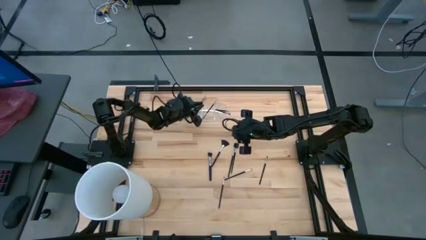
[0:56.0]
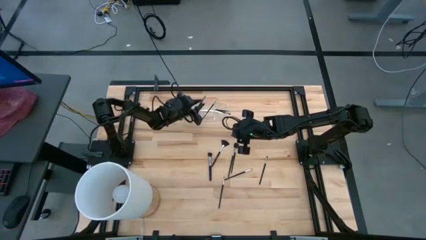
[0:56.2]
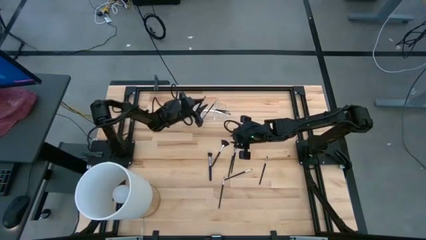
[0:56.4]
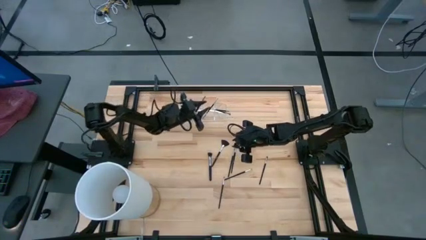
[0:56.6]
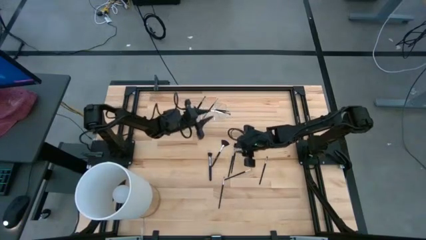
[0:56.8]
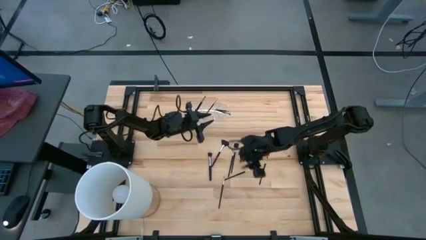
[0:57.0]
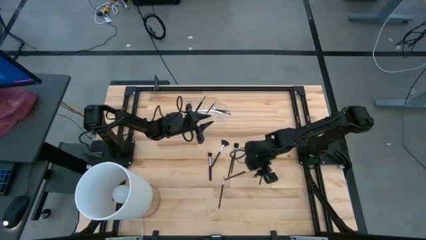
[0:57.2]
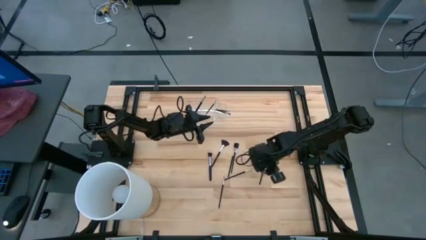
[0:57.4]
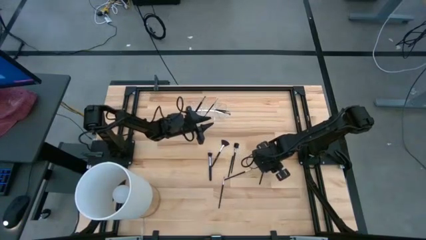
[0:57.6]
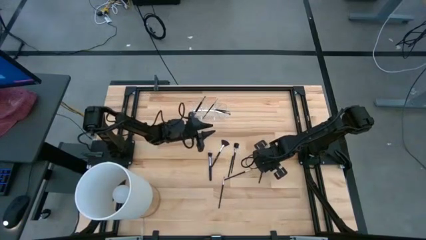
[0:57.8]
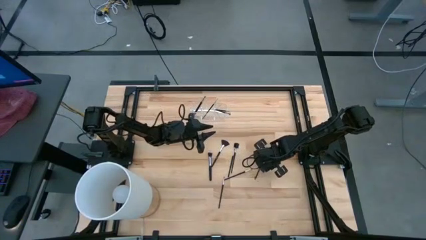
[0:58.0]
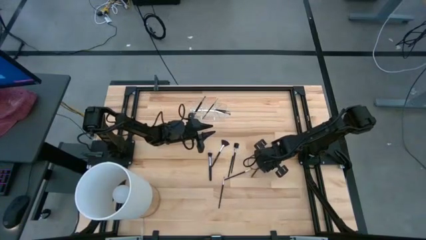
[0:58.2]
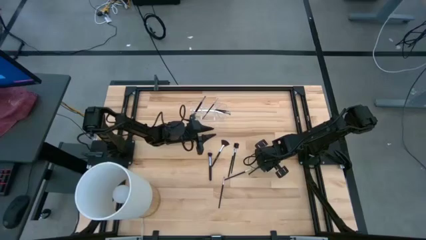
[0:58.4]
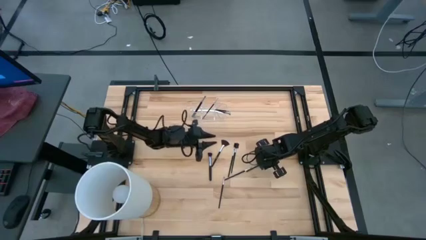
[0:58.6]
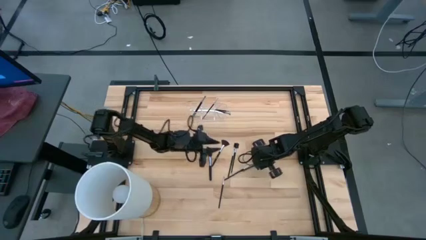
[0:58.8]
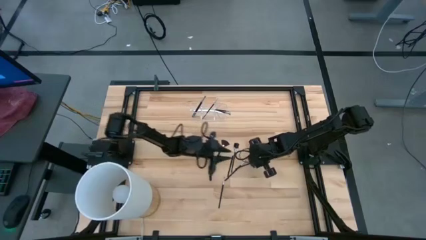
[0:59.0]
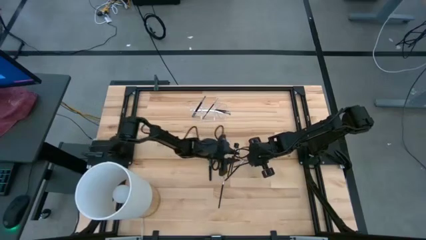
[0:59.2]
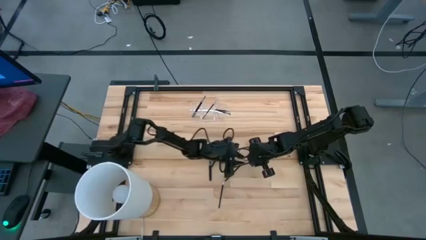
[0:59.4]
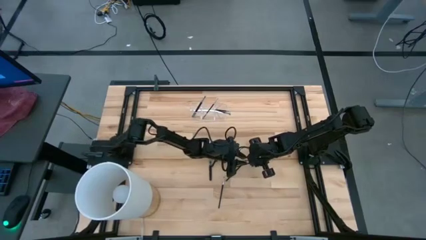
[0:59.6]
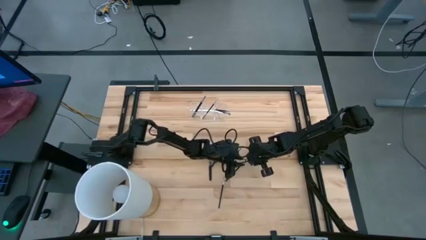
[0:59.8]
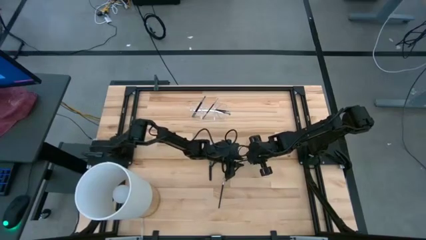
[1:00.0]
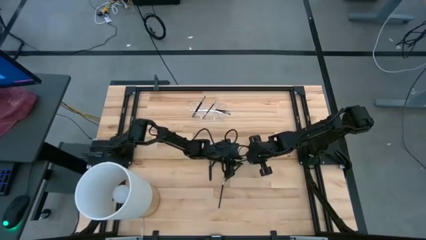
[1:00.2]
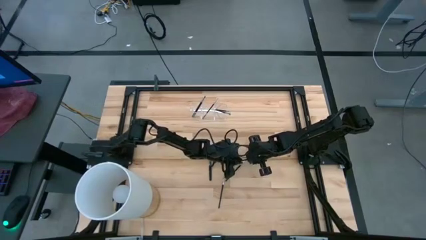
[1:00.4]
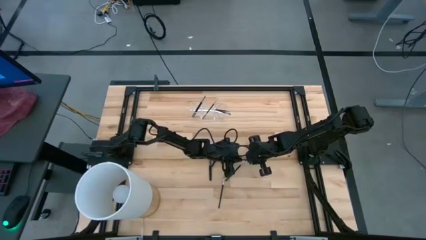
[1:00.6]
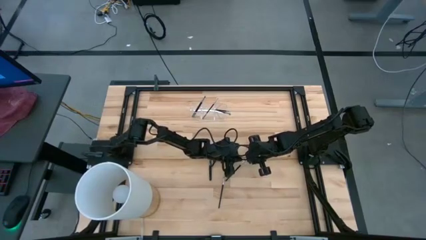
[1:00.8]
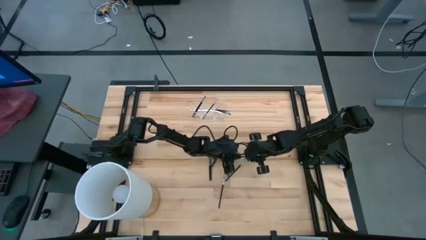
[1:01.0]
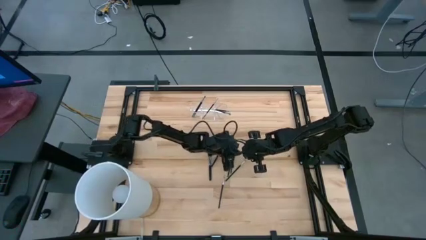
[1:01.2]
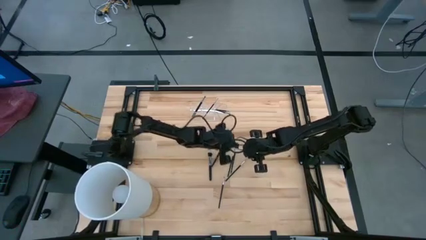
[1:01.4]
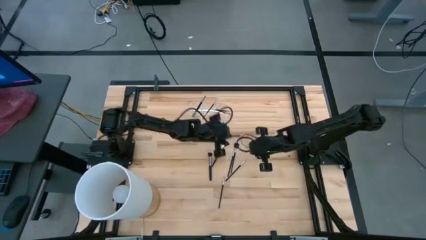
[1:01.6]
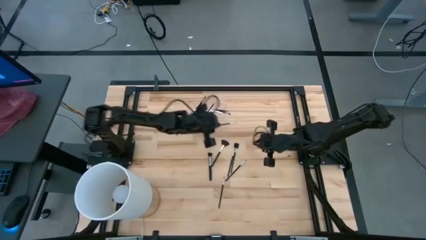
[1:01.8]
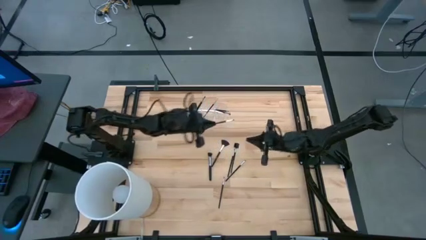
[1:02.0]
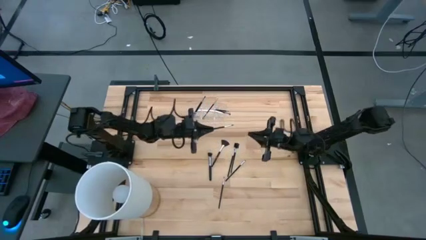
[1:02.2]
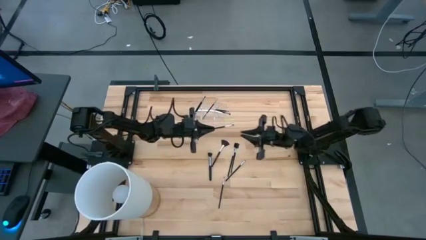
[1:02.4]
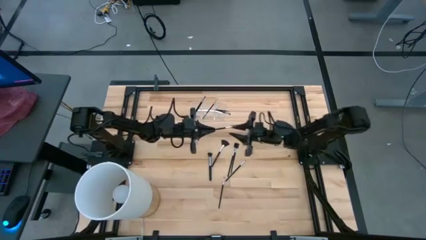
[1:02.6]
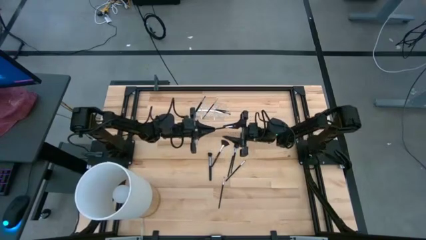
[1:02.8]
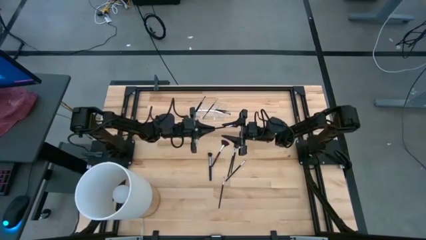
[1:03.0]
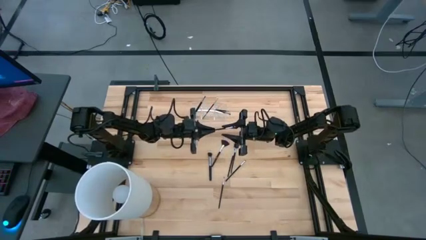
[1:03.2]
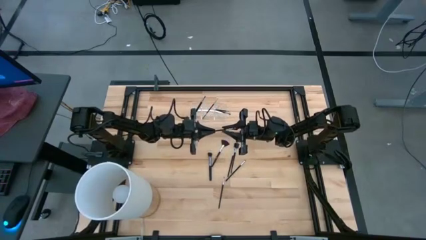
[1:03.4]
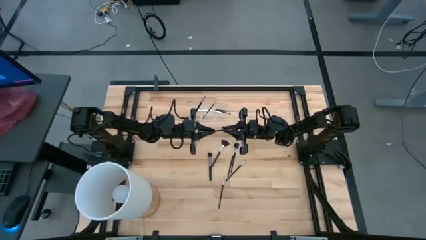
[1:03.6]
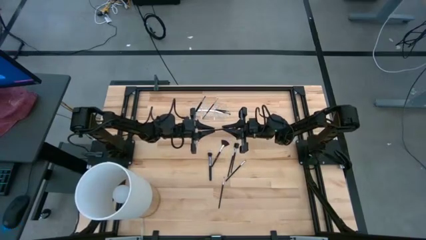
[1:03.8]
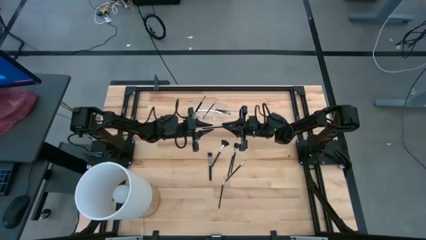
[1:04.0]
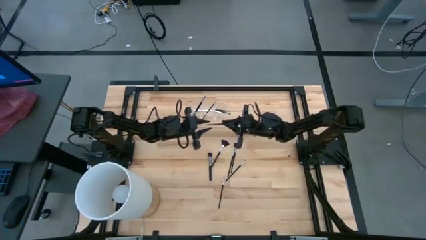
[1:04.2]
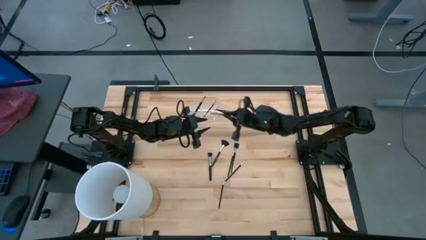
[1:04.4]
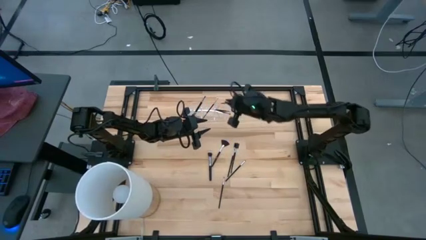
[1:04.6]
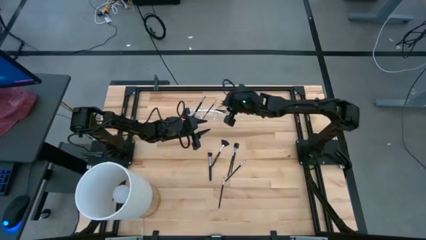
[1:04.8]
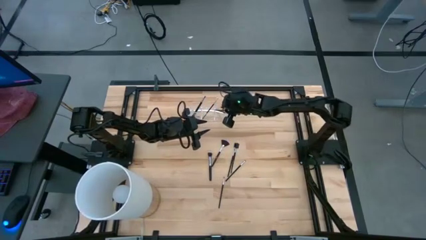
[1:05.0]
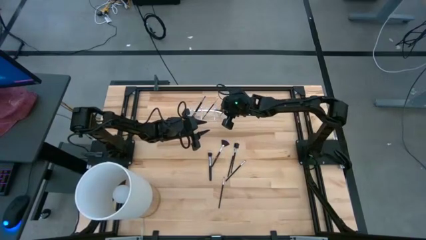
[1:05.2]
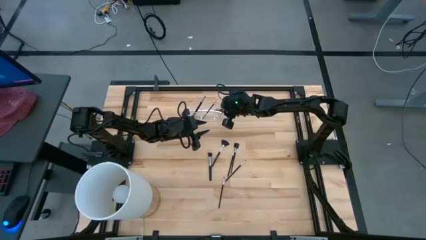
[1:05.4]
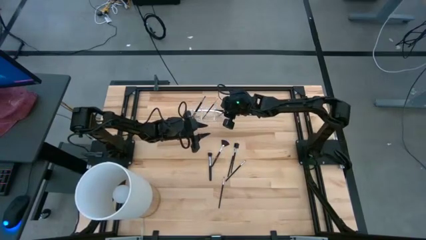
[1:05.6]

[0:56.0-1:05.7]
Task: Put items in baskets/containers
Put the black eyeshadow brush into the transparent organizer

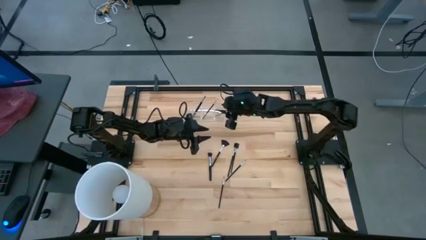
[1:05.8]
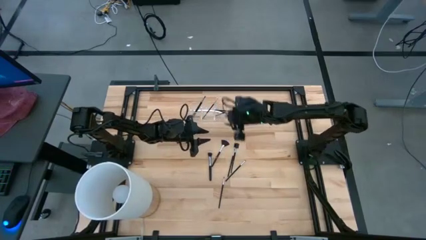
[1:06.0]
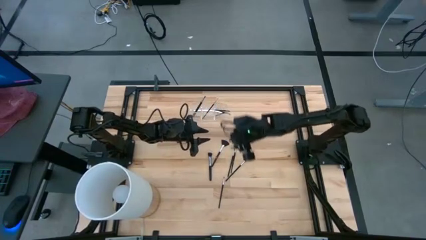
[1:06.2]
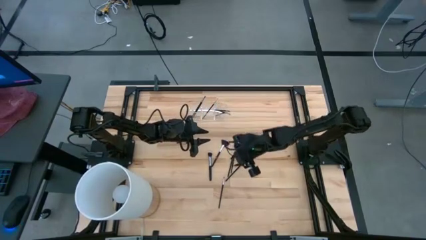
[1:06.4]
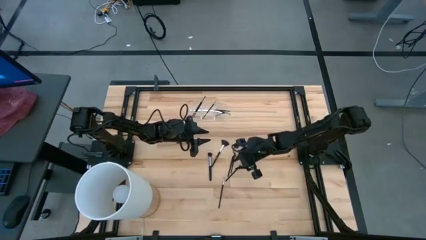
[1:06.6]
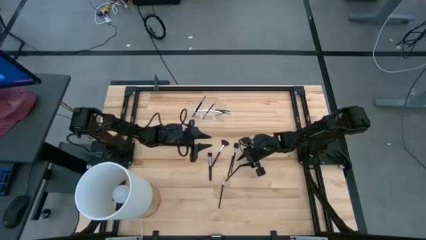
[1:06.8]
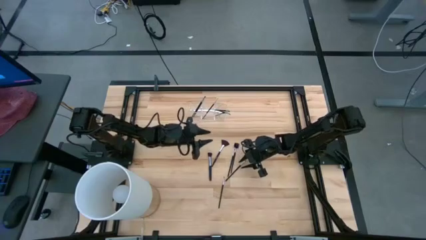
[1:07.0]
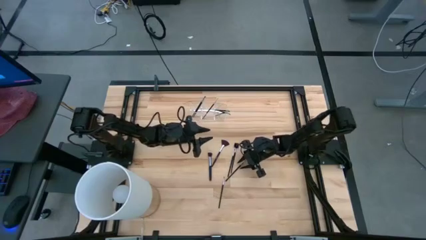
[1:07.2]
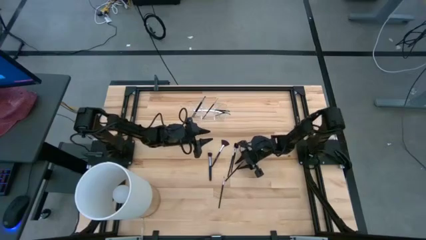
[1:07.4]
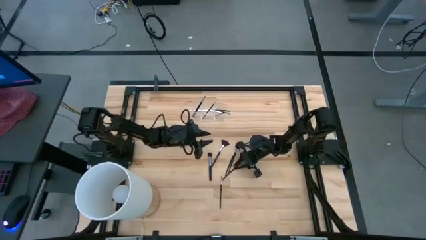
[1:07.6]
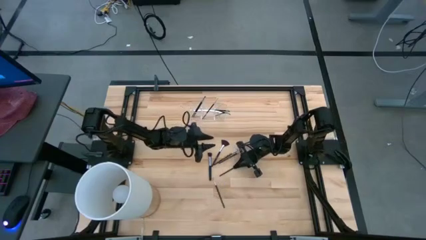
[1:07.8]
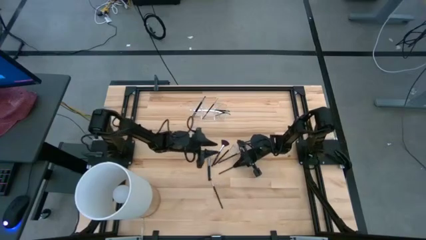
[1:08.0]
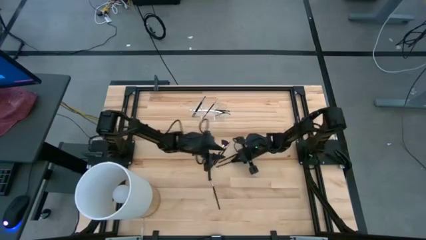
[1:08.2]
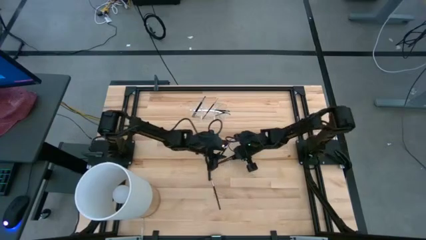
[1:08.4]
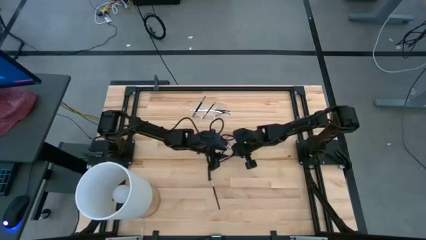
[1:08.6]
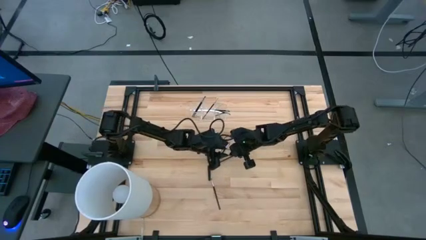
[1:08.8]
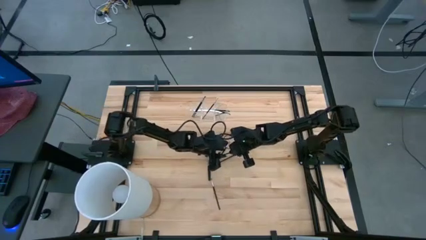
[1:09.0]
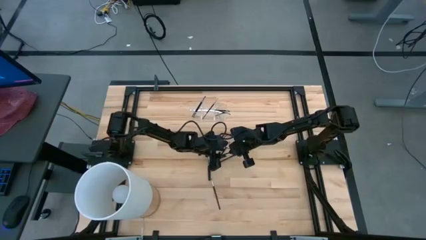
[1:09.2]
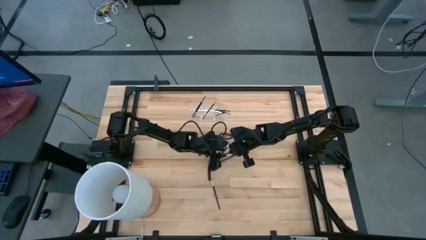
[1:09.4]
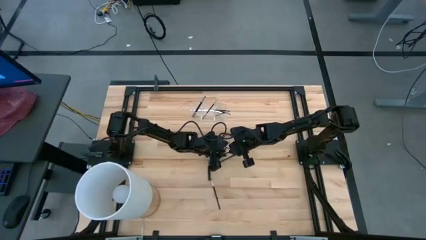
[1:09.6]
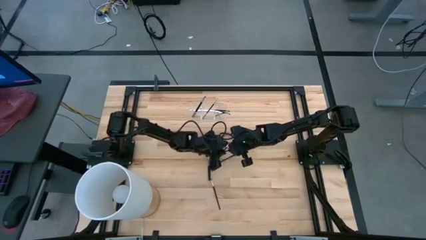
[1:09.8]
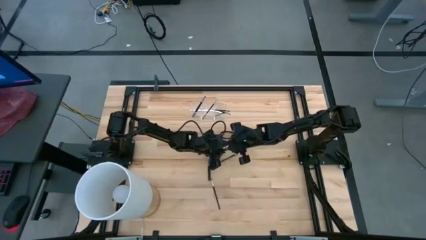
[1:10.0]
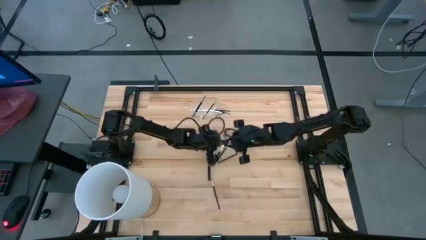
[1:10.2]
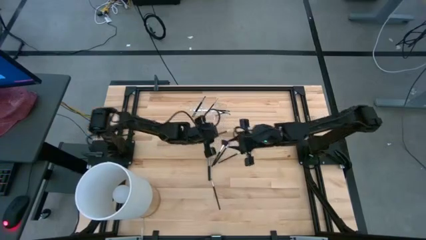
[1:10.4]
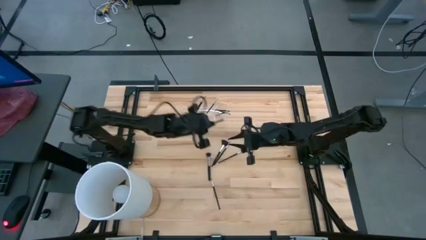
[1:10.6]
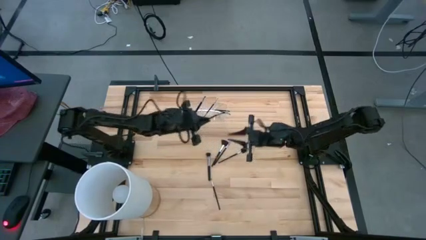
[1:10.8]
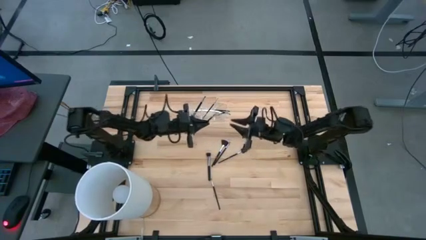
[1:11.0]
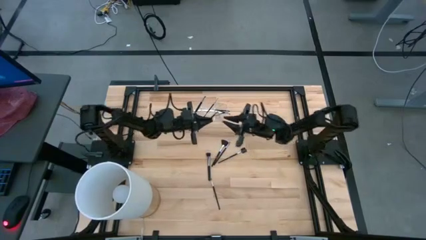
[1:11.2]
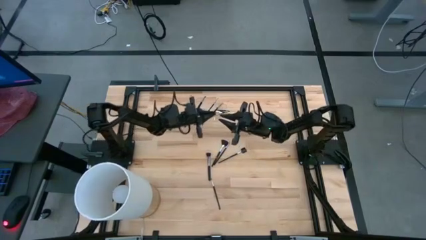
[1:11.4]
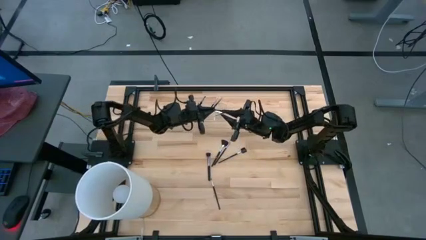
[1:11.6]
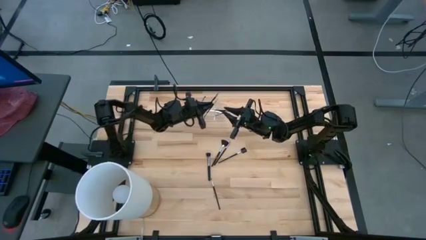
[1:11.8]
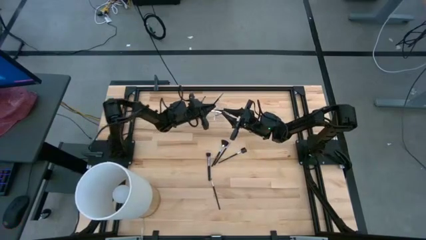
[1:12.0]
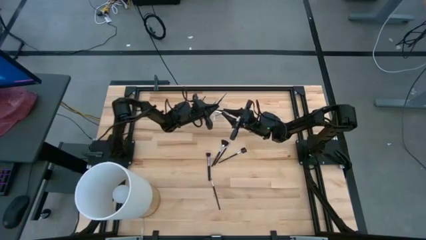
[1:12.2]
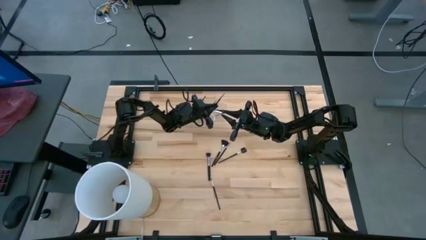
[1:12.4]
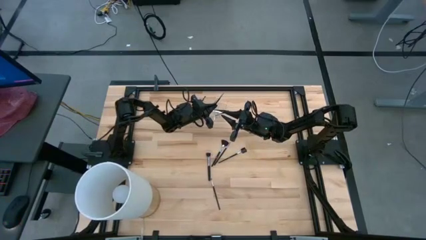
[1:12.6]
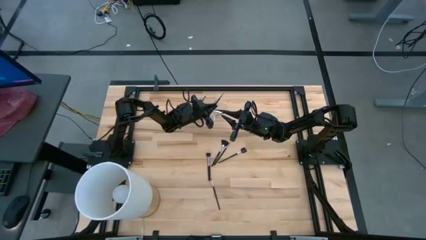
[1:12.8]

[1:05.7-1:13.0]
Put the black eyeshadow brush into the transparent organizer
